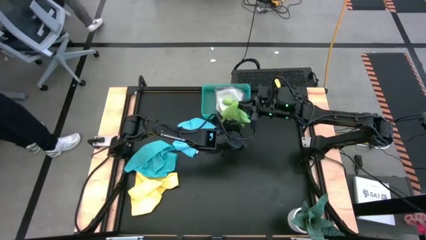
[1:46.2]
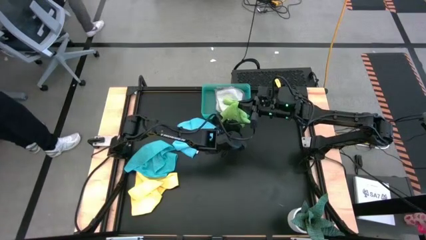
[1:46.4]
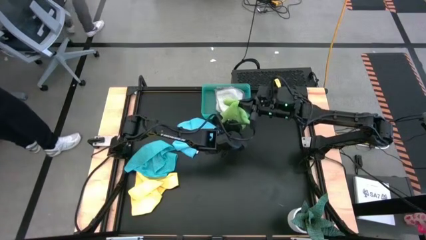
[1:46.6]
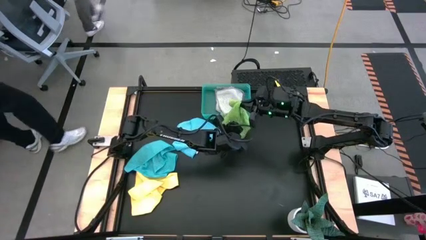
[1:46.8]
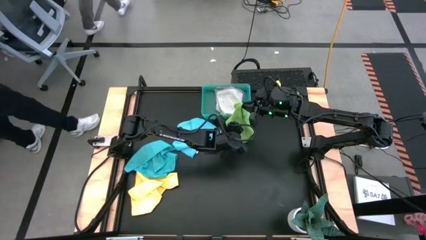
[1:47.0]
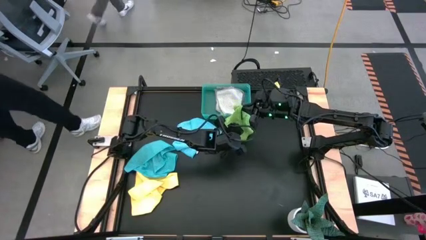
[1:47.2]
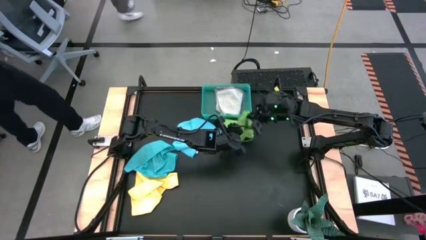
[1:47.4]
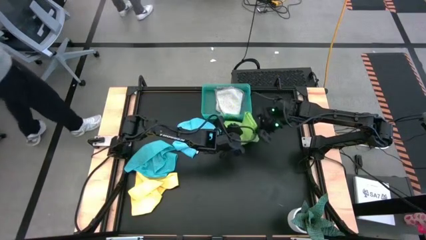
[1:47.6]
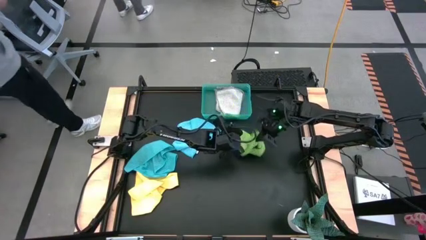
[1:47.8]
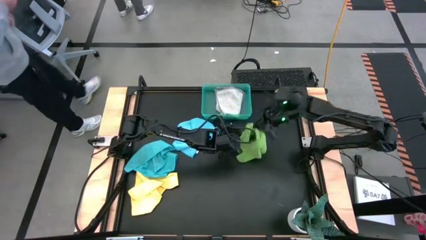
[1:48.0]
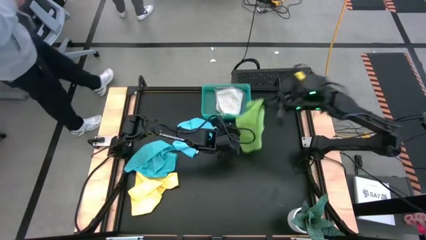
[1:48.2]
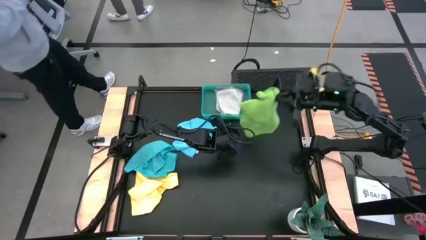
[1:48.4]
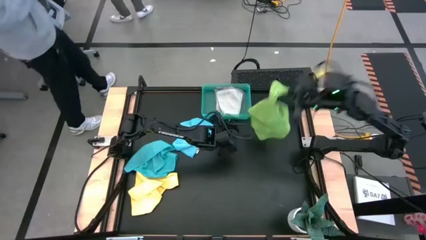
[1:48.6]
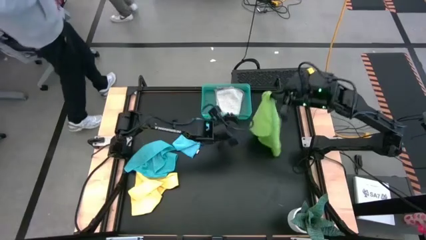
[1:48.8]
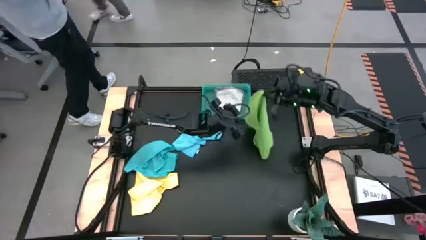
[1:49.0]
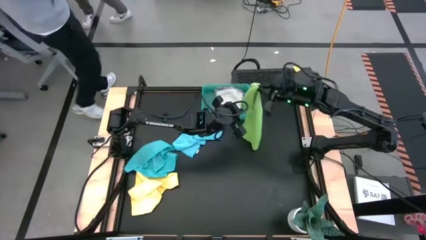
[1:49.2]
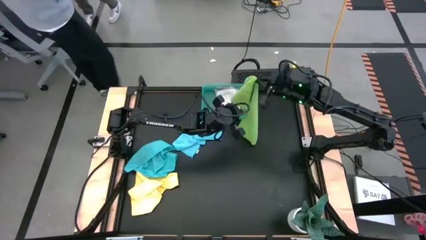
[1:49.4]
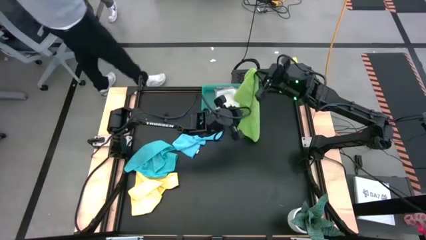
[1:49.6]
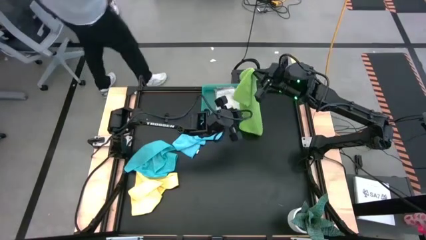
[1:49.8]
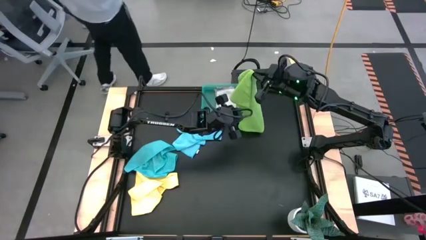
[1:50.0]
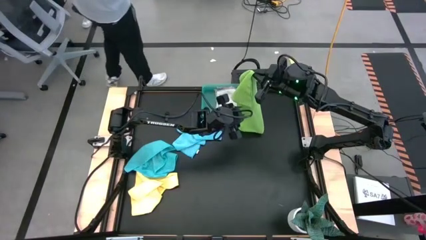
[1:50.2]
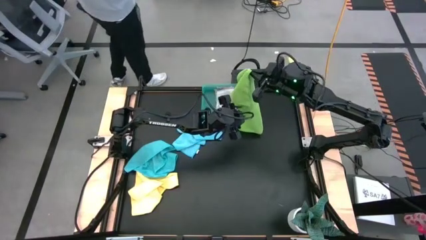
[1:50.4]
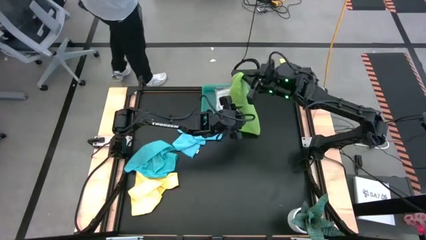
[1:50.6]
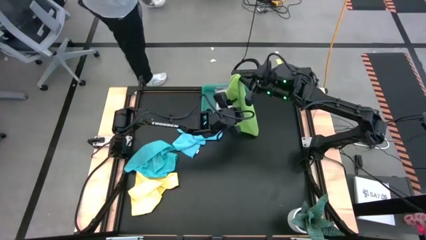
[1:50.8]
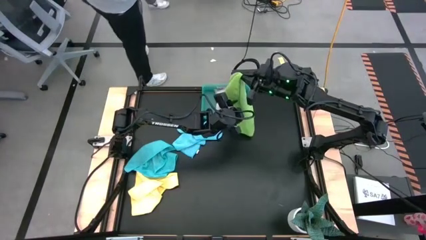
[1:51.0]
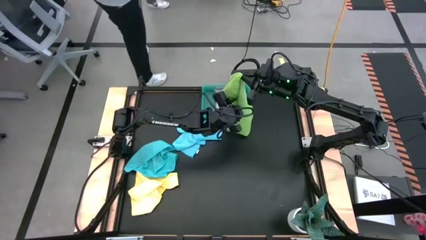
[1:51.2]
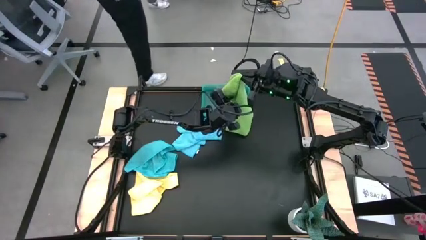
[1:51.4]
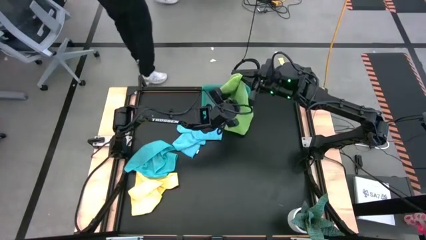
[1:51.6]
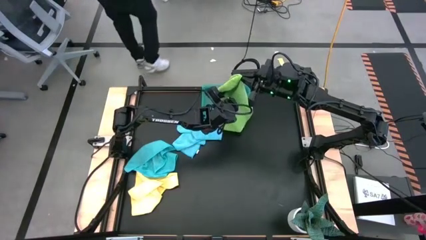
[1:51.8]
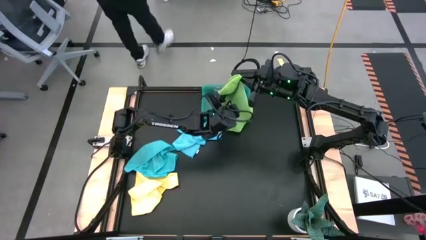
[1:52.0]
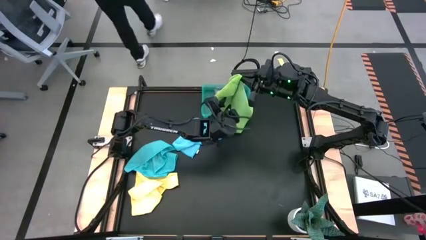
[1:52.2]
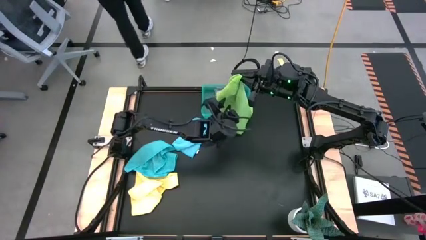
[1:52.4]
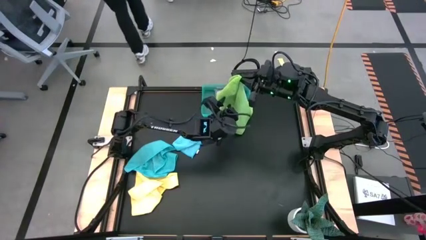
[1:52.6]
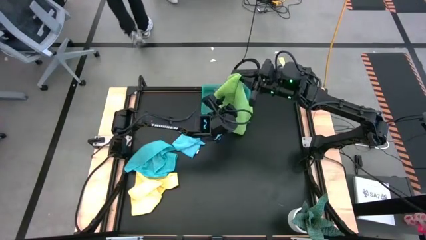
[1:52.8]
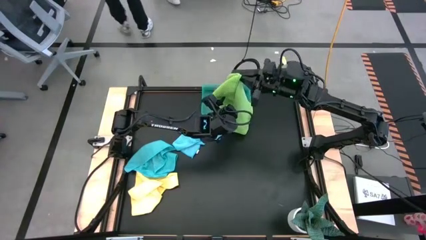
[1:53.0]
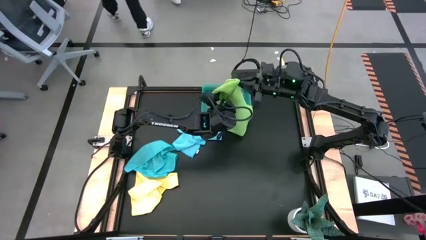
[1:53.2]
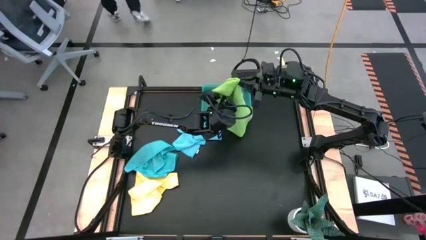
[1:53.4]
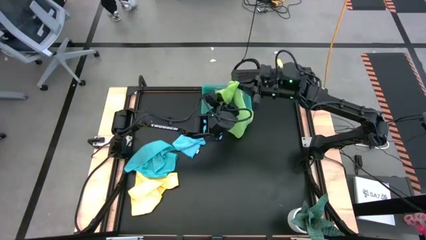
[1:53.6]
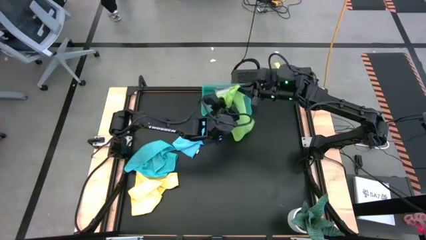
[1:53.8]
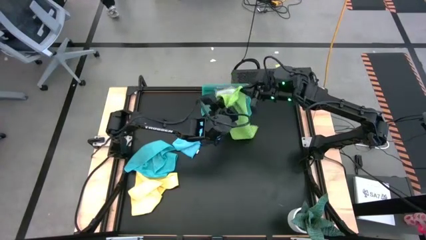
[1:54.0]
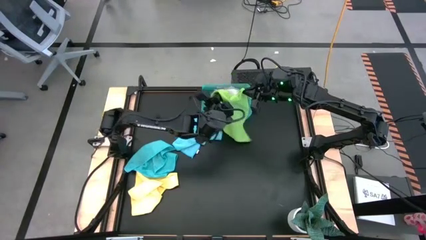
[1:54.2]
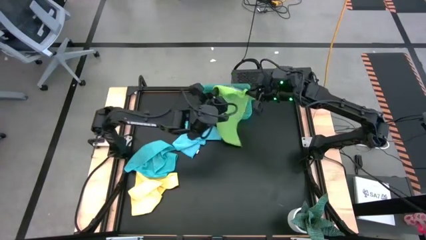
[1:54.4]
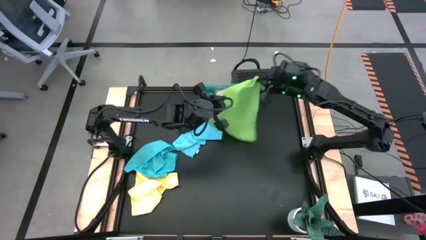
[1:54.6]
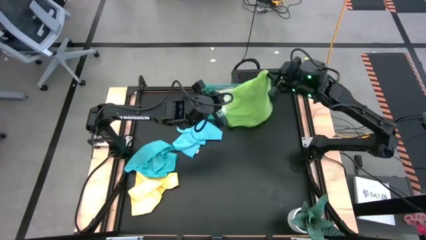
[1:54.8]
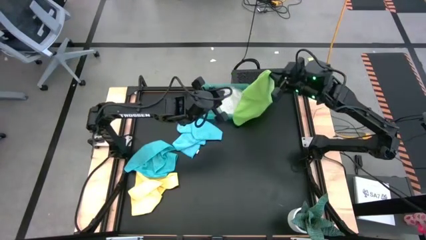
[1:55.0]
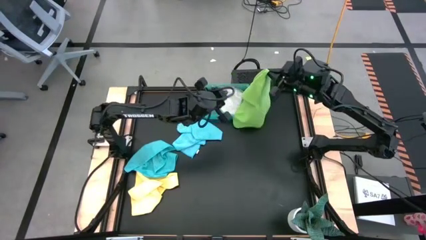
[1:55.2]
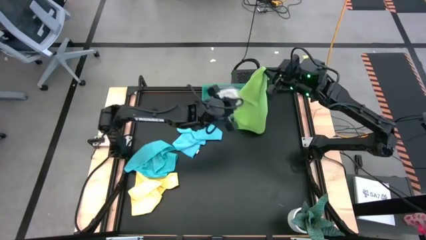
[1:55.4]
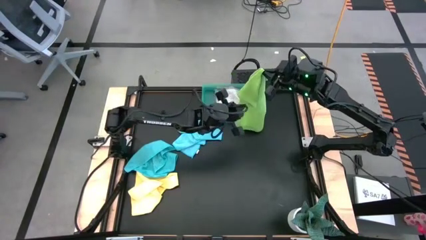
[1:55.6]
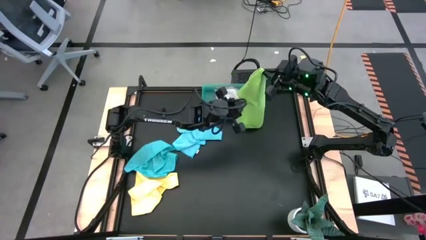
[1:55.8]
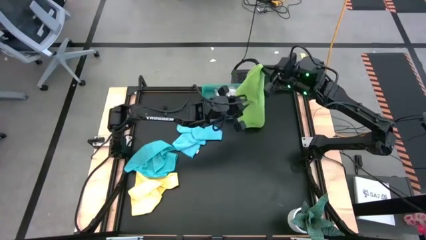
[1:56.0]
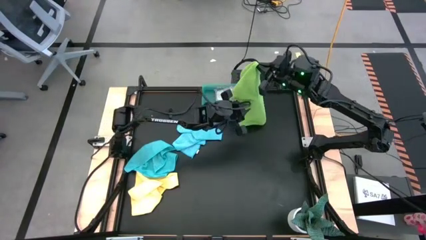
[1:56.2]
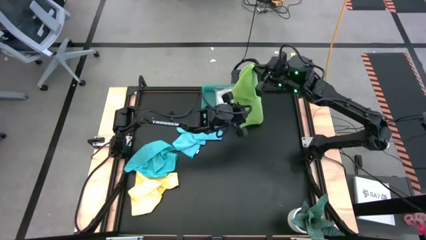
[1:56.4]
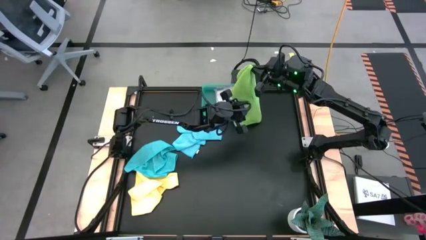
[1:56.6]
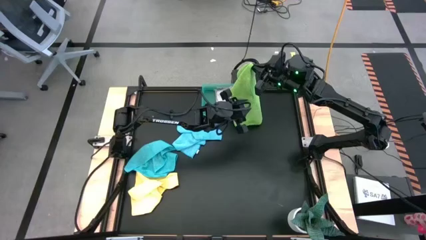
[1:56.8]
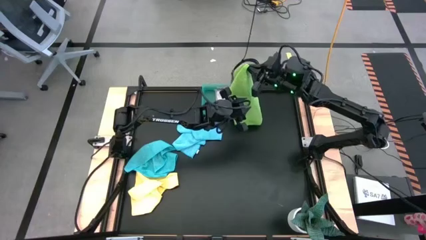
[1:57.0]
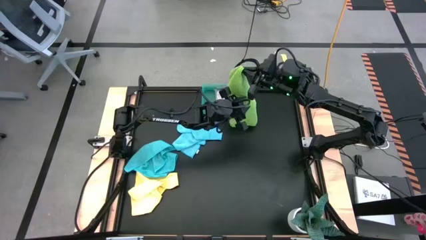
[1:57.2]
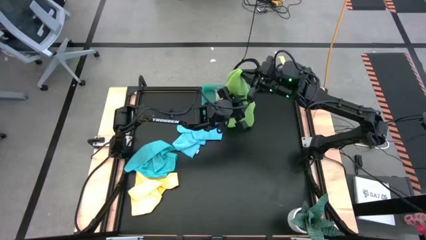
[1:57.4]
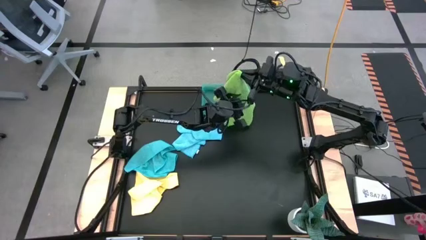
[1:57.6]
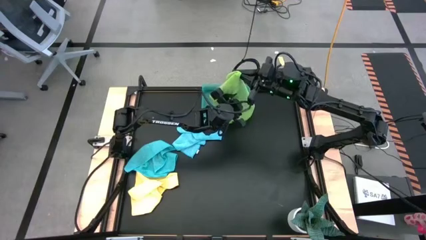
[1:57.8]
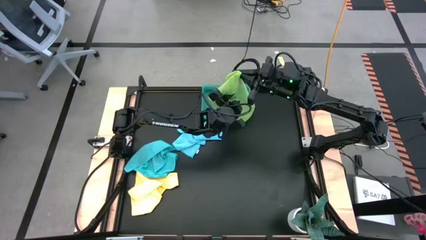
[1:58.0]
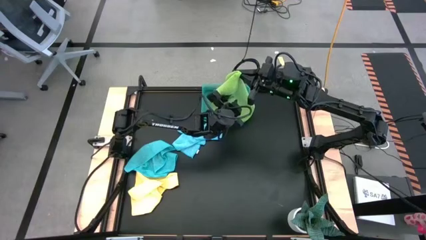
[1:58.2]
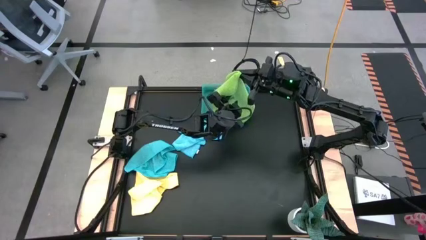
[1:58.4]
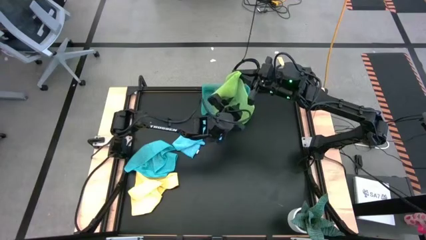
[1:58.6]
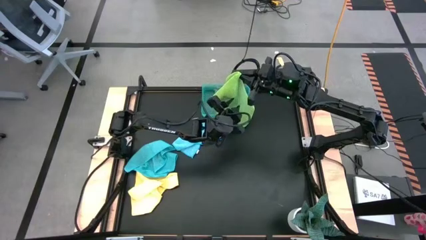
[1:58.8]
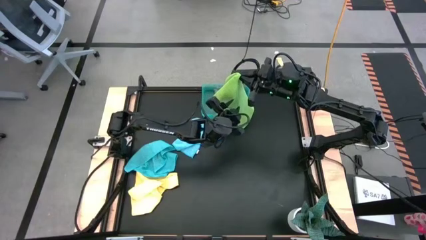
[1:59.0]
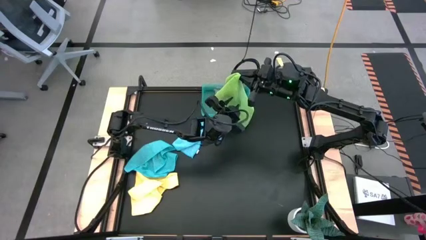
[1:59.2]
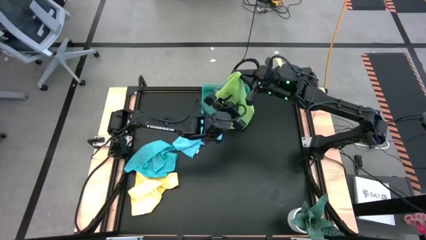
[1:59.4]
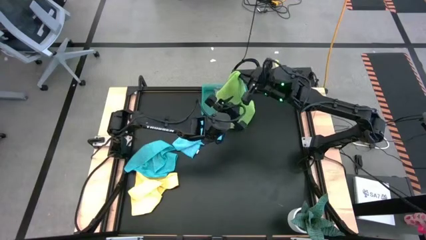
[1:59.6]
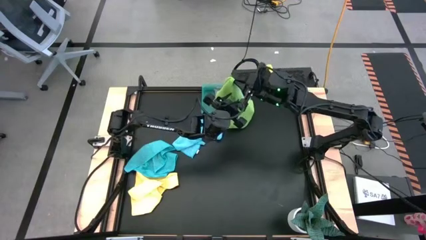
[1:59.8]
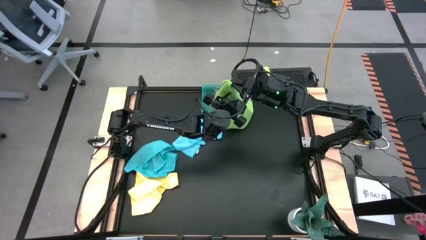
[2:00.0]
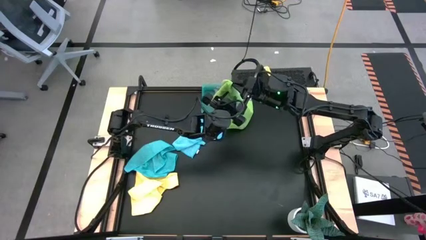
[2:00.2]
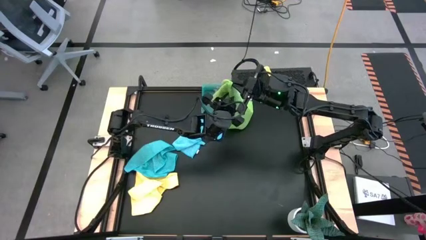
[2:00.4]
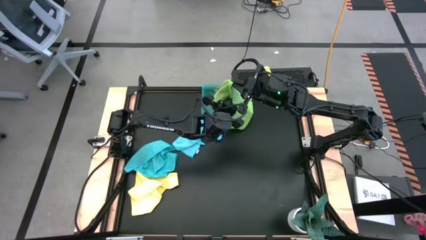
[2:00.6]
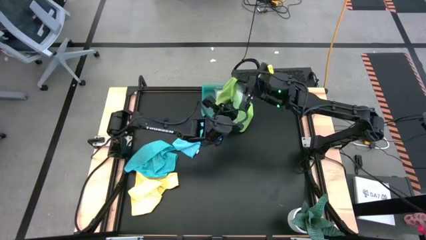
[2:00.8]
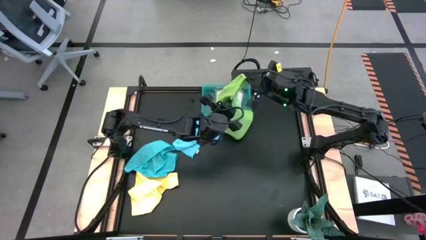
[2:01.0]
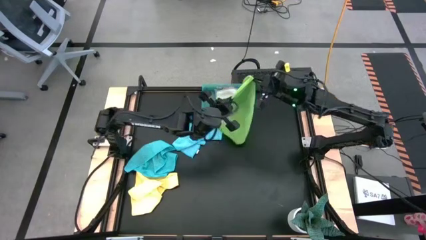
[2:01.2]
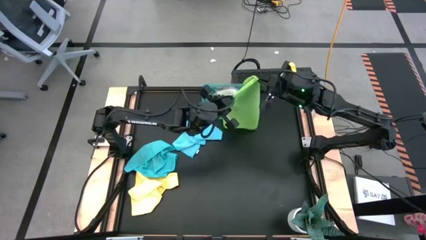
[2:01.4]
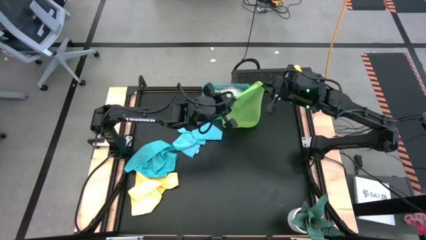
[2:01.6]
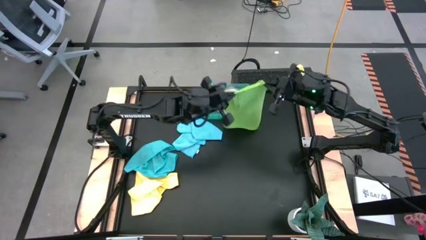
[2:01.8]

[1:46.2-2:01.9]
Task: Fold microfiber towels
Fold the green microfiber towel
